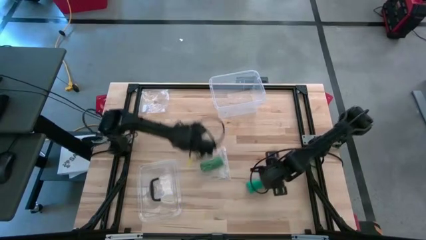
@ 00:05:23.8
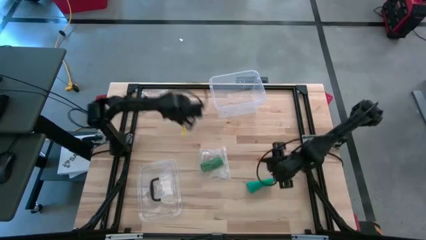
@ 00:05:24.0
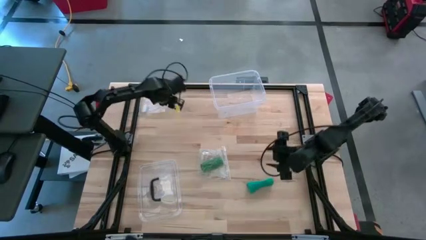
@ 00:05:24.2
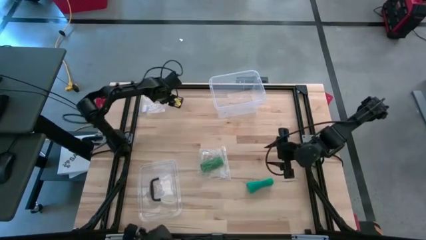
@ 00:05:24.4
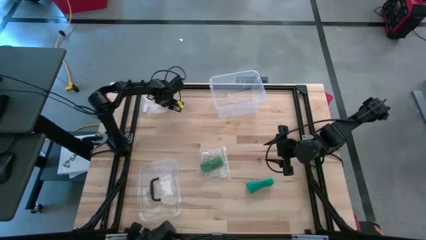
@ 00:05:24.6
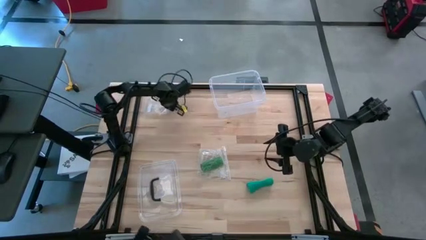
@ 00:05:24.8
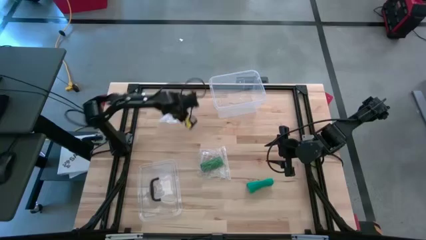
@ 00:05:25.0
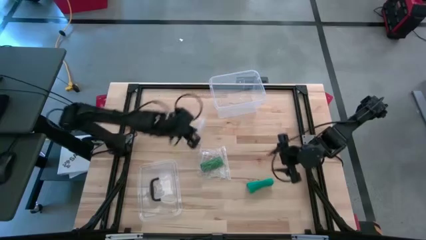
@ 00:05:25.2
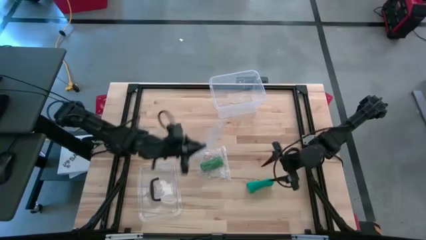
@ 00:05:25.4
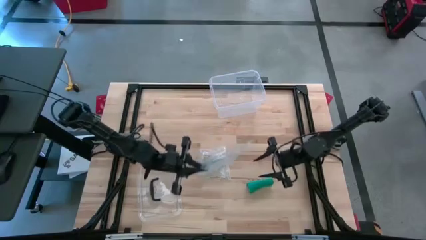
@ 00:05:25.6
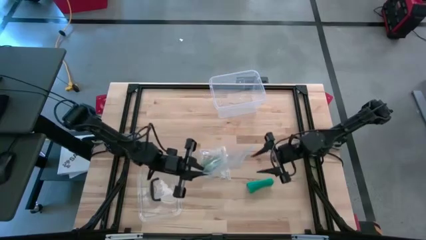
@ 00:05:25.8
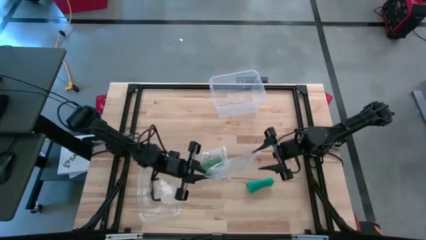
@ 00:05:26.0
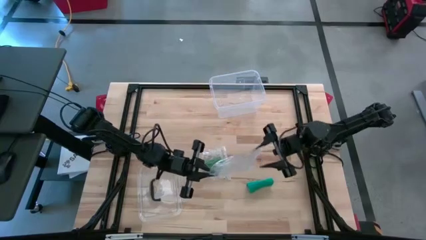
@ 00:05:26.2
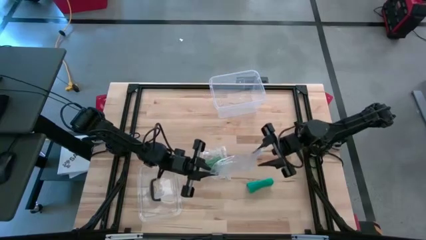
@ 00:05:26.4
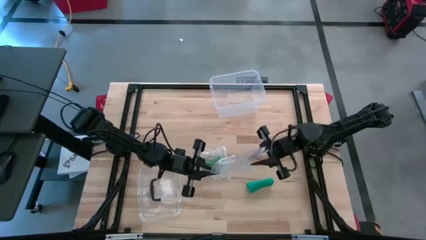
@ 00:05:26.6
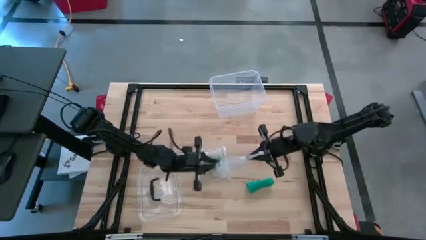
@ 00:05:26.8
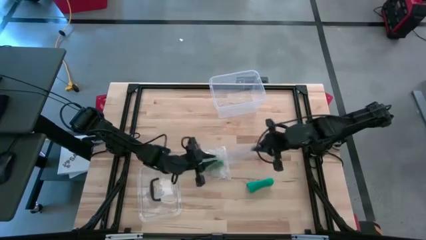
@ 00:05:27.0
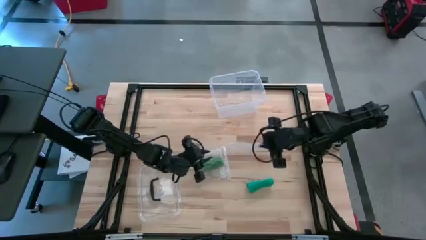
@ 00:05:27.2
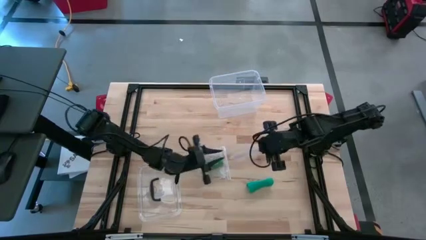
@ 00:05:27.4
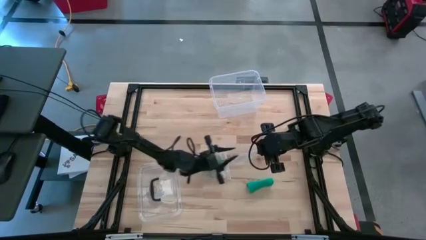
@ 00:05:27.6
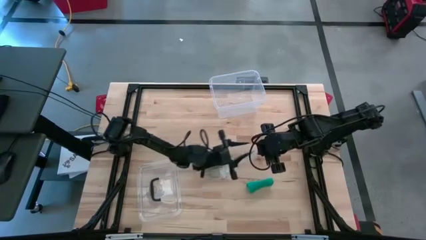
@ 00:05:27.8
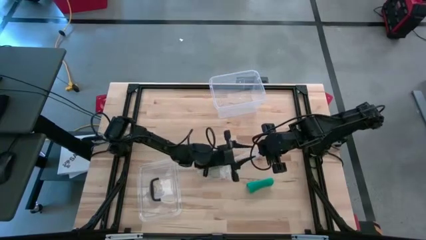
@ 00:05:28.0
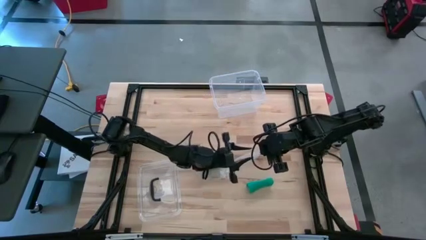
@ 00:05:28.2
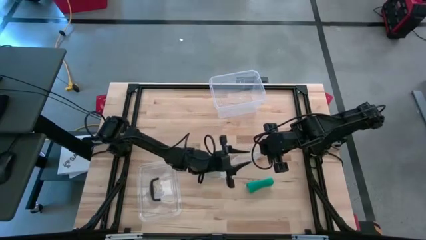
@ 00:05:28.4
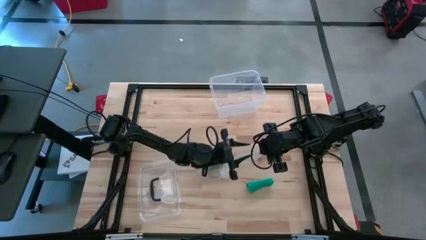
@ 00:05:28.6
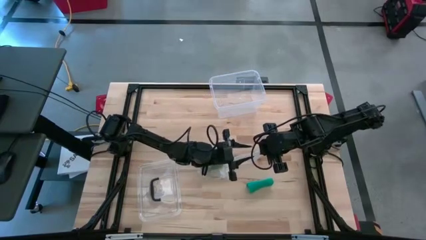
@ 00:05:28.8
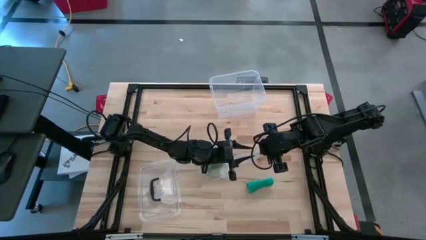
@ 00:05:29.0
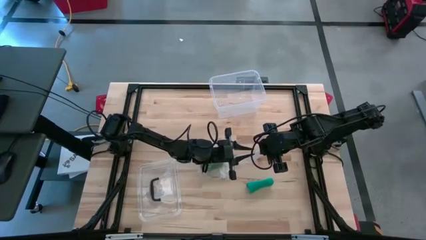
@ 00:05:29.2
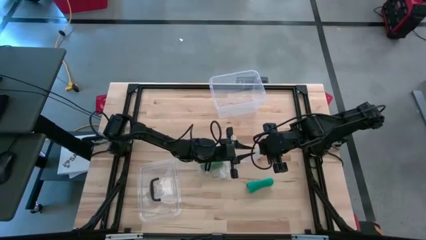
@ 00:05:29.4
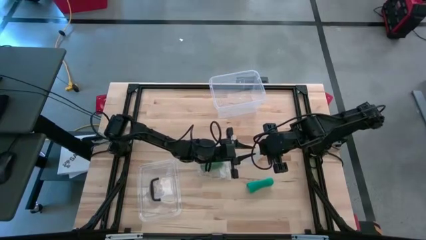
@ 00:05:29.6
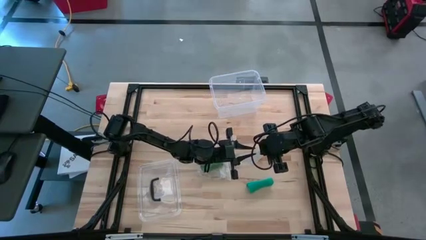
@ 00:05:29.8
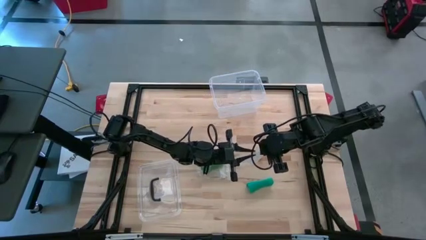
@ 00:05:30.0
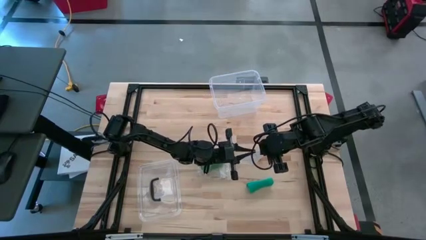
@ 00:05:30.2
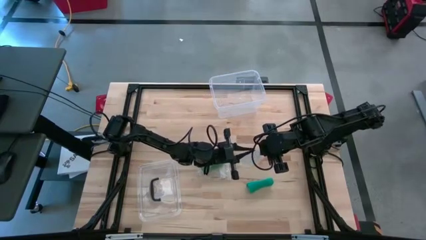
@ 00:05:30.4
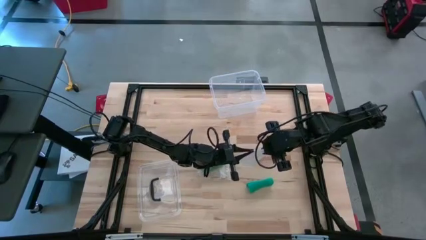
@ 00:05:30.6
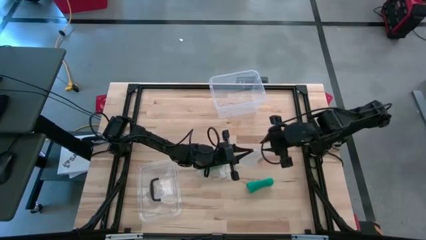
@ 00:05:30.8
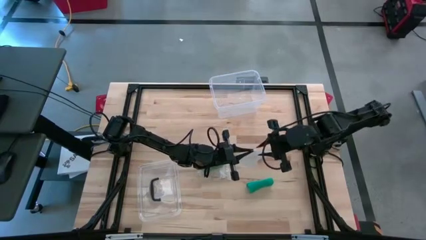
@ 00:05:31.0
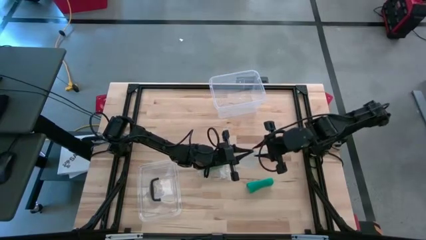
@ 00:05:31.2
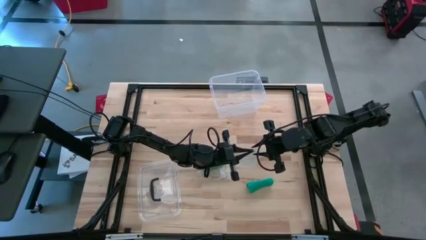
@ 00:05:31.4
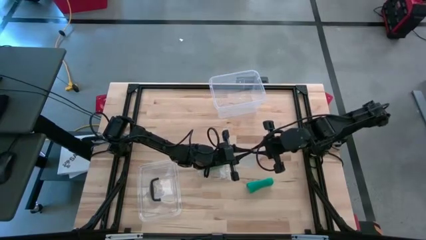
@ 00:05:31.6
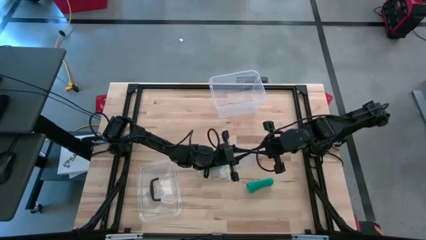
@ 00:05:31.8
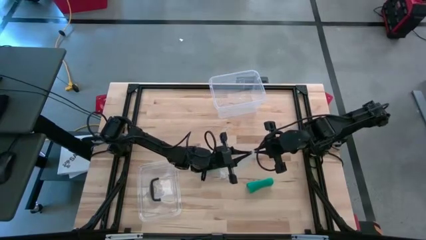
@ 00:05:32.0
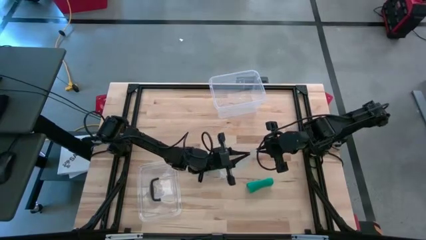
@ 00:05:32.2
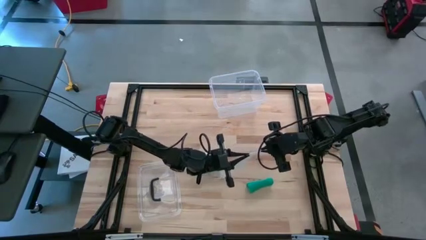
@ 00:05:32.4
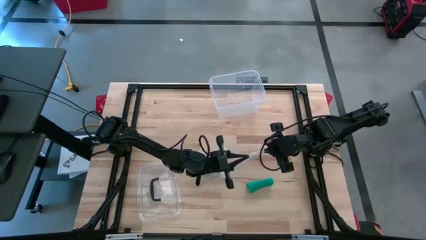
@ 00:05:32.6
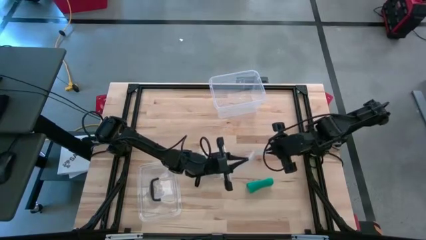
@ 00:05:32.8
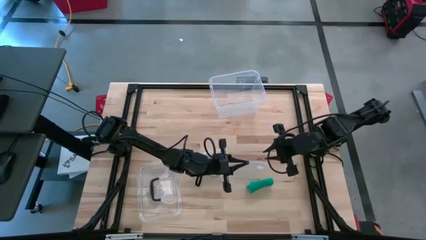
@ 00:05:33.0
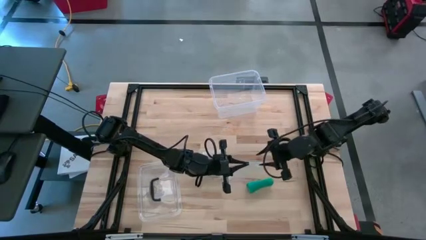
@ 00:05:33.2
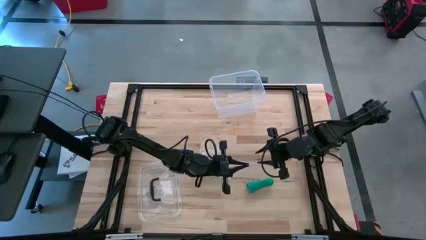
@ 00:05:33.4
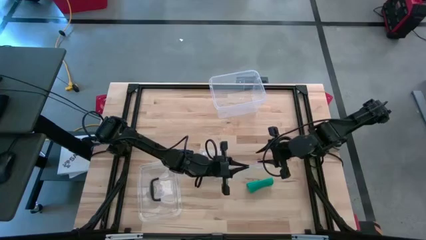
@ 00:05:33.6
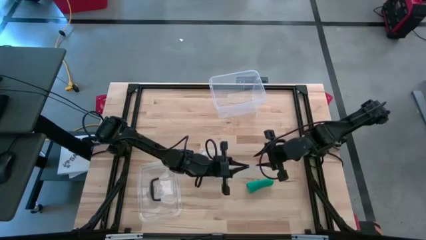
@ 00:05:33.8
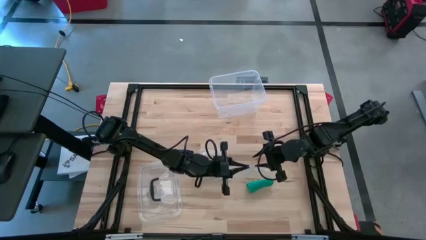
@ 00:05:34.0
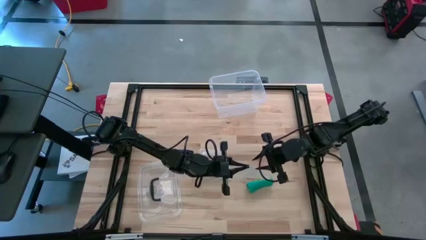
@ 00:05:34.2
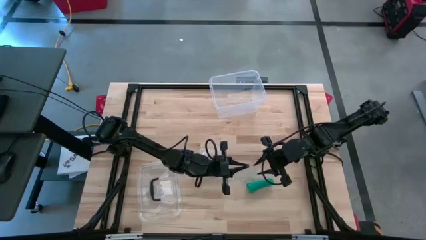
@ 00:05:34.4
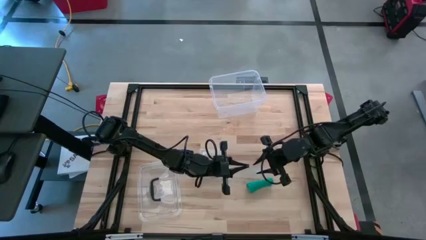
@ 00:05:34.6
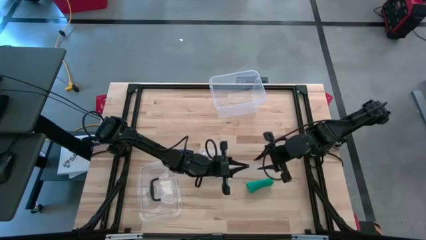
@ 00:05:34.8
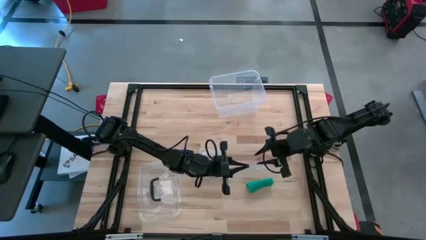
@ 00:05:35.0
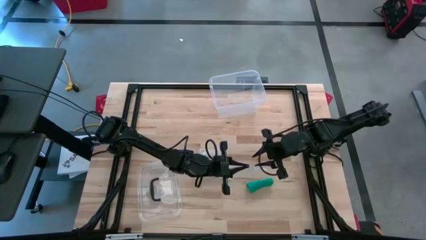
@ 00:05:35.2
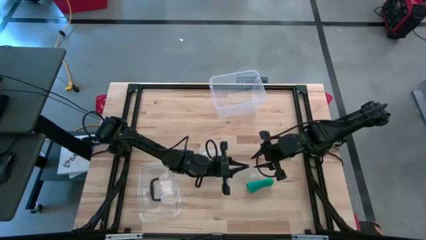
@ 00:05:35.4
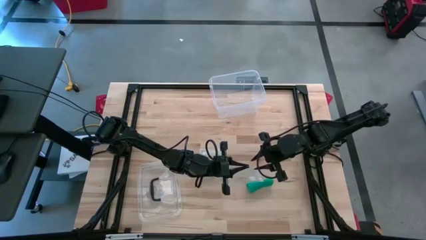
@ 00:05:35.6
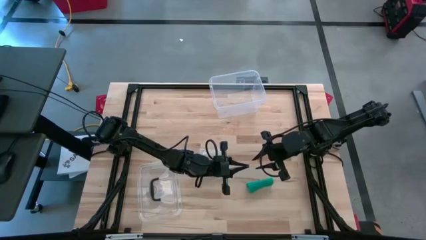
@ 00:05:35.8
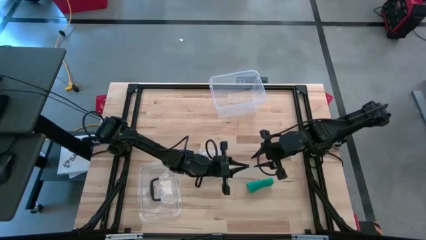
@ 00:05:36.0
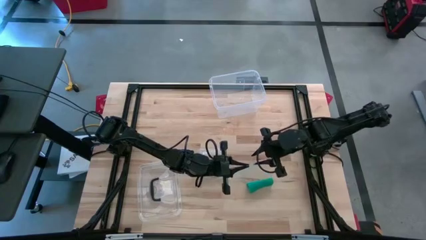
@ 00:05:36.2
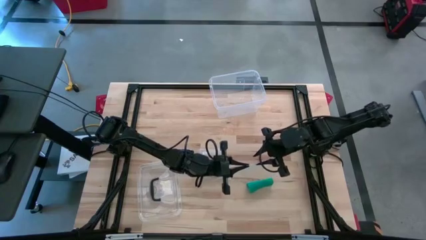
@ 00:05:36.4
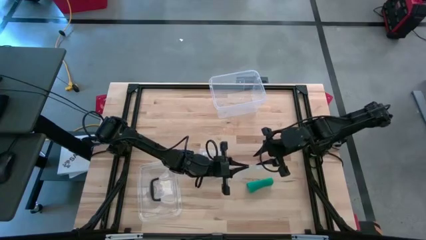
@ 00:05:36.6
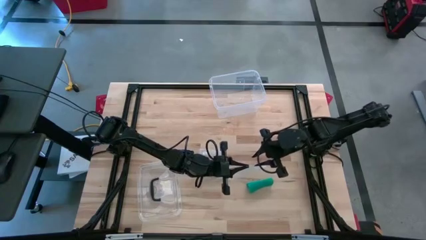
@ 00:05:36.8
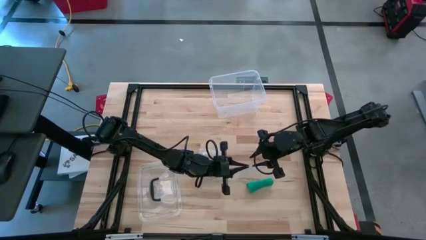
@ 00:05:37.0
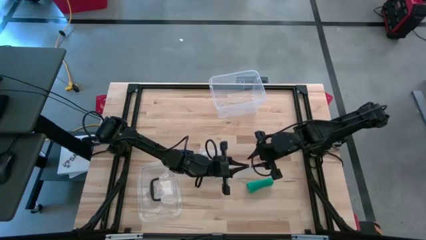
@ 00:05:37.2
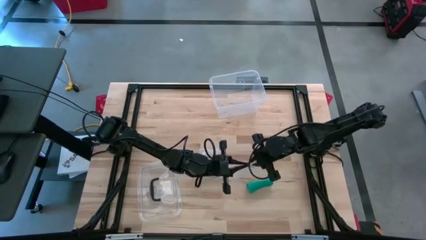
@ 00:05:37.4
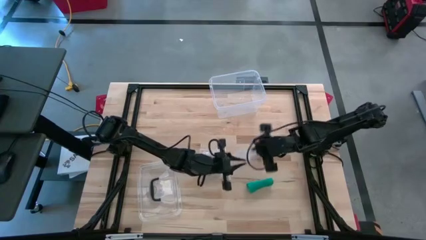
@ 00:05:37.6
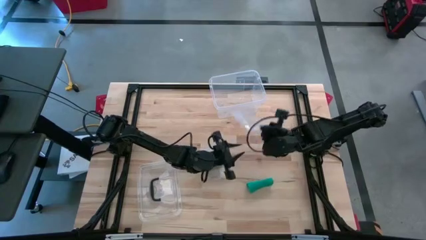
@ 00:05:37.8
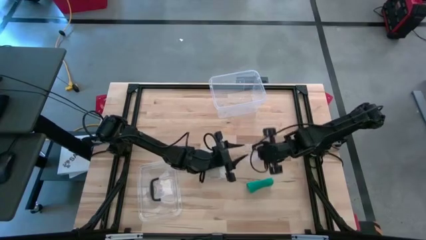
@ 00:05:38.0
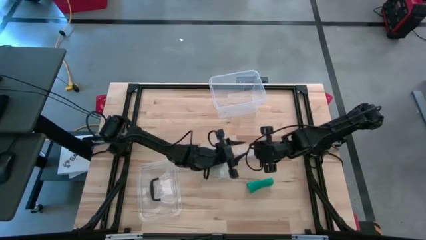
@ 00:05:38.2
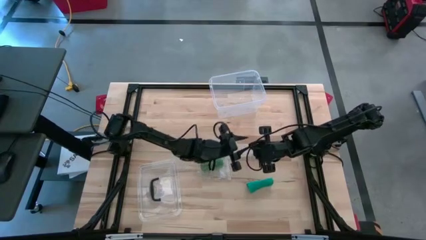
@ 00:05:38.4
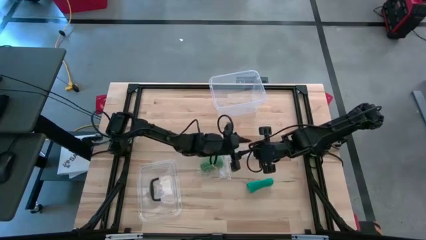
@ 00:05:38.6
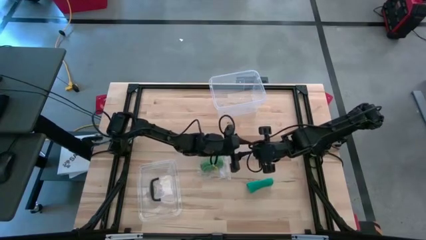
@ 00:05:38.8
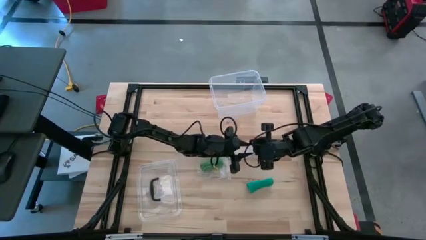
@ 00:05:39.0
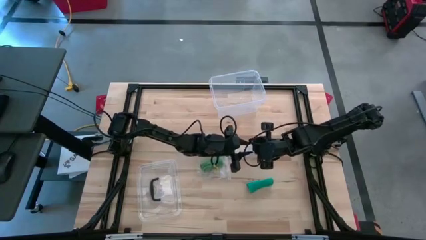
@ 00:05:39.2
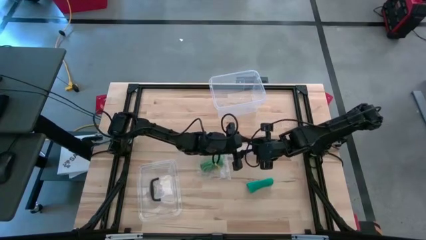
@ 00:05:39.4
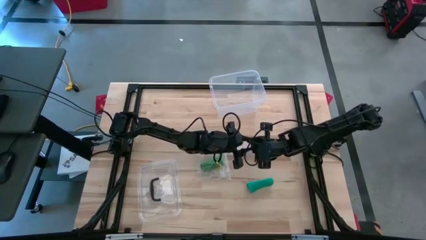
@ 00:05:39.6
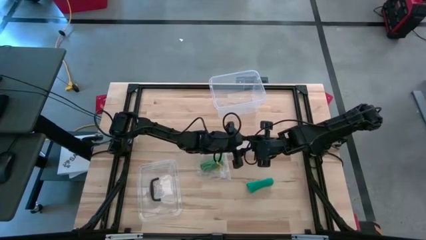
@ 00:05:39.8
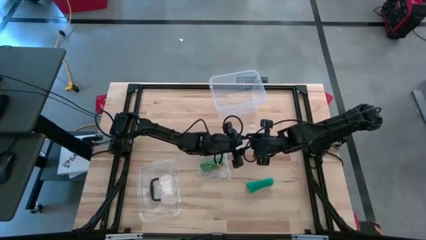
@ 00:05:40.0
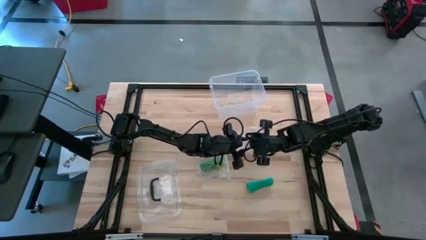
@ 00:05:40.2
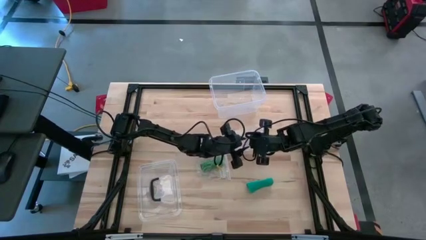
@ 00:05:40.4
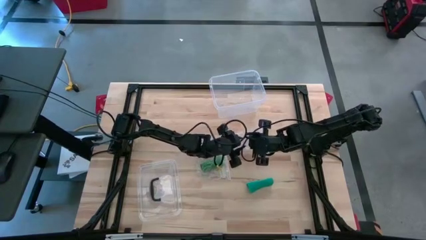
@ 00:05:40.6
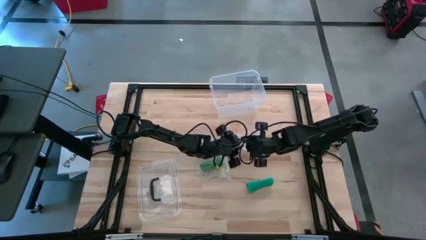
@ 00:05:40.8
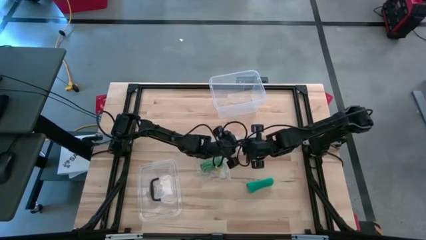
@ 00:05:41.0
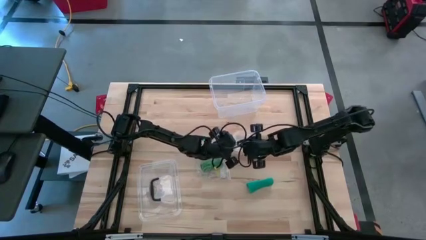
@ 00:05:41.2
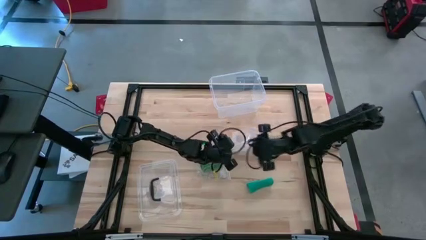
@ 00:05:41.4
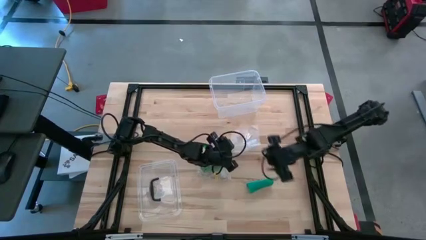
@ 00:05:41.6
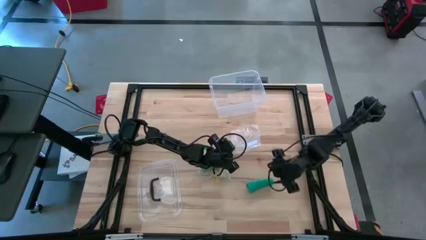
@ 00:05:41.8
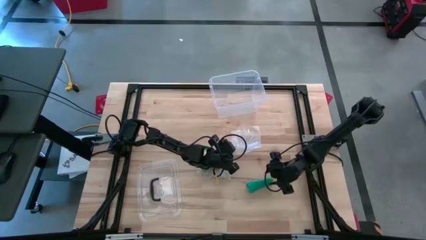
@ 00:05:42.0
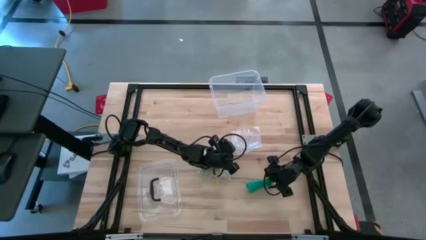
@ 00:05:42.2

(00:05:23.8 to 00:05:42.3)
Task: Roll bandage
Open the transparent zip bag
